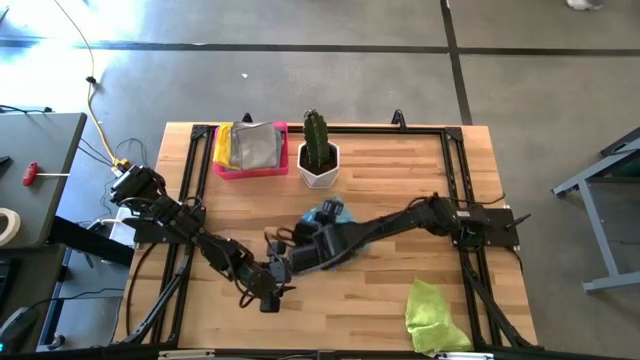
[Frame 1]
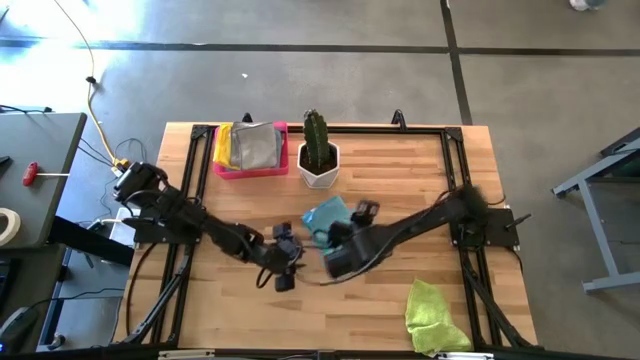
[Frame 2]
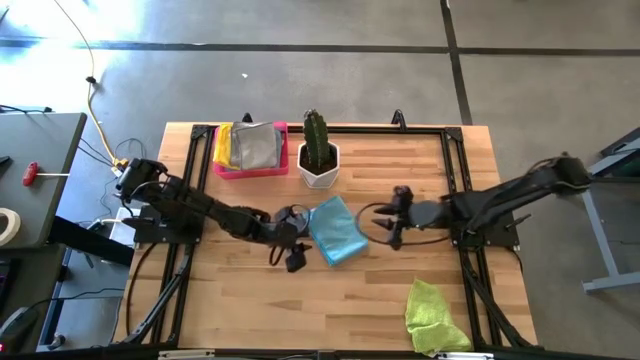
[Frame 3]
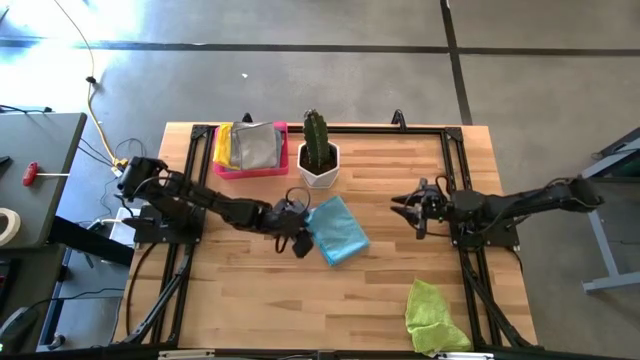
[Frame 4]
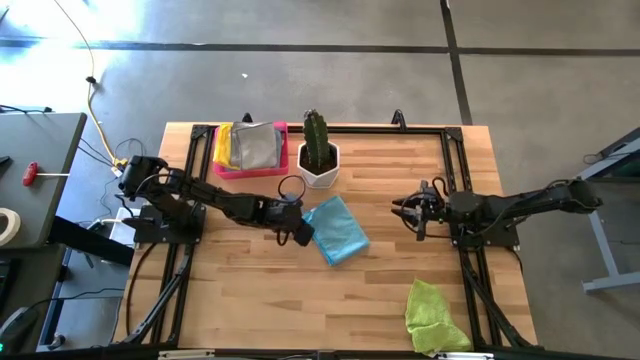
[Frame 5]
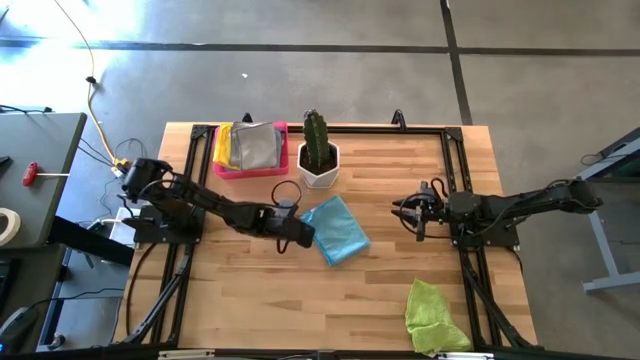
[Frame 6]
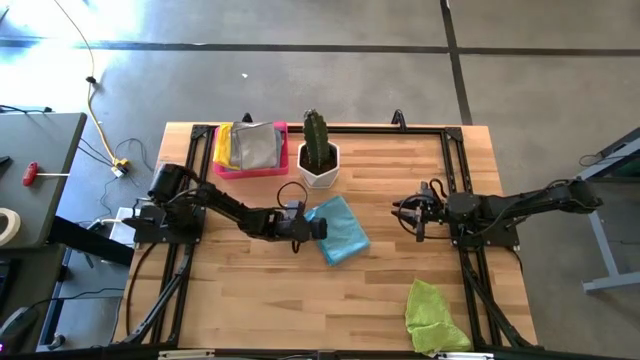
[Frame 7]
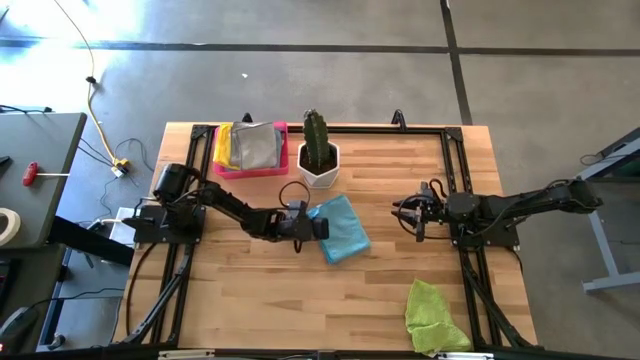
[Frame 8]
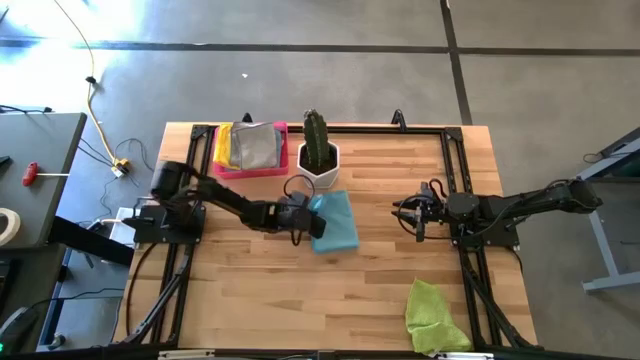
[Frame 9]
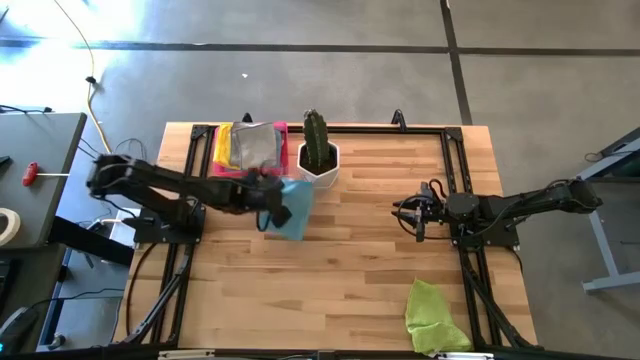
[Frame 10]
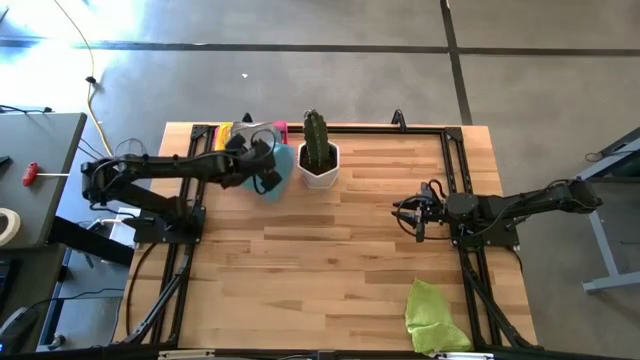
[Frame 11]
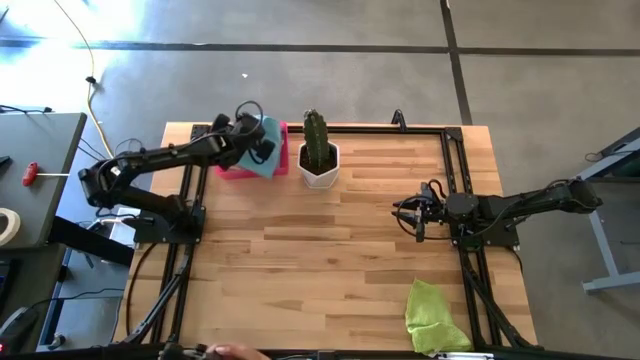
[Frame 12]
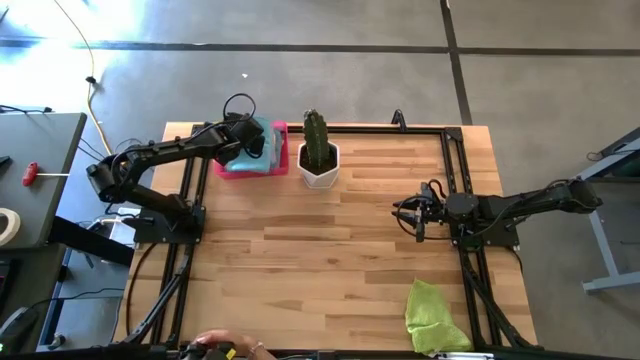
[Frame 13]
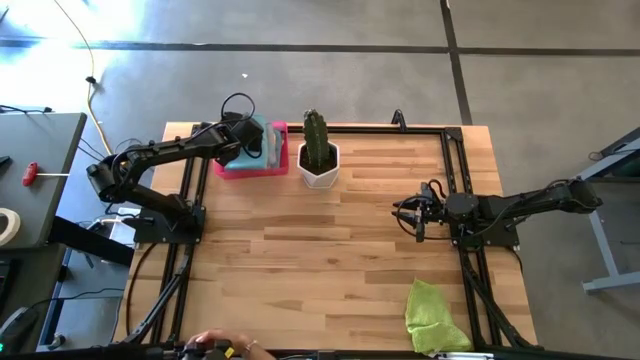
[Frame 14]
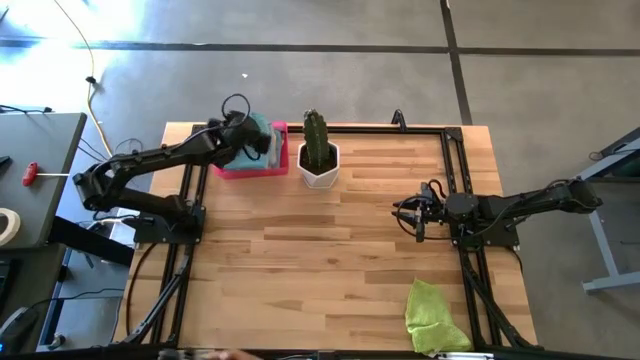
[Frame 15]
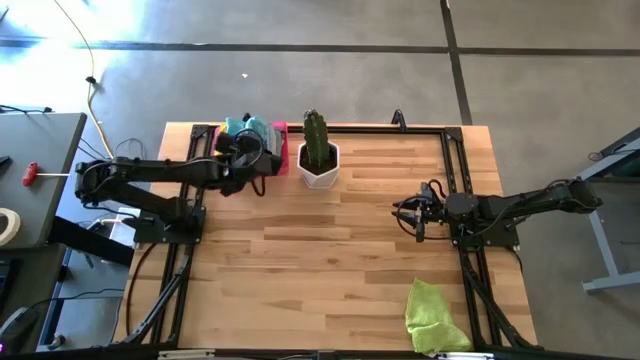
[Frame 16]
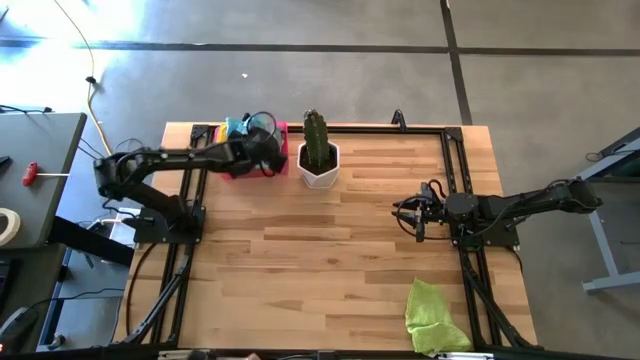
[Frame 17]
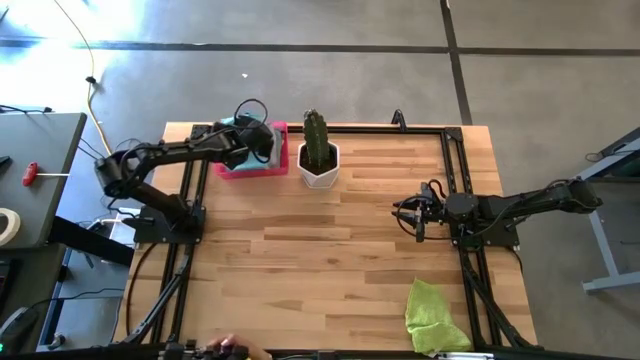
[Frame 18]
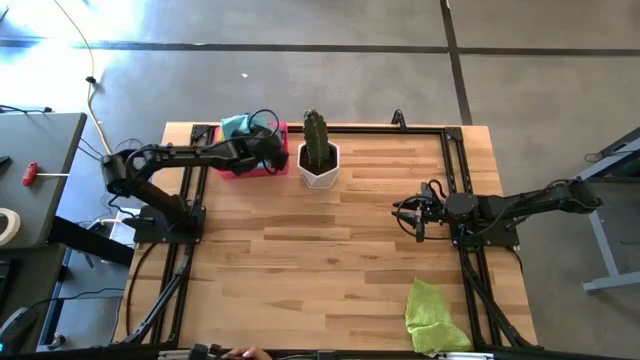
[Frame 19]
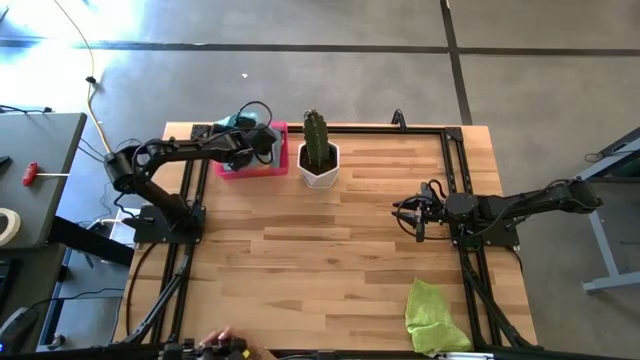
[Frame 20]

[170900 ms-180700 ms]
Task: Fold microfiber towels
Put the folded blue microfiber towel on the pink bin

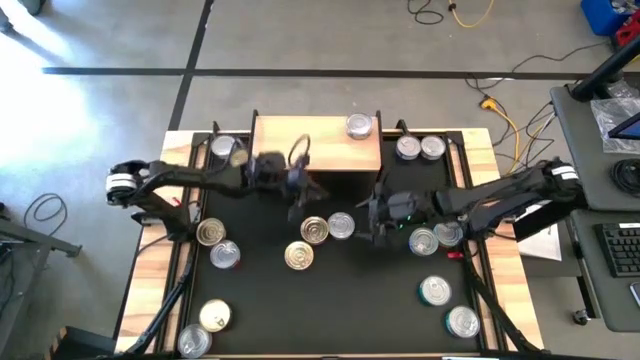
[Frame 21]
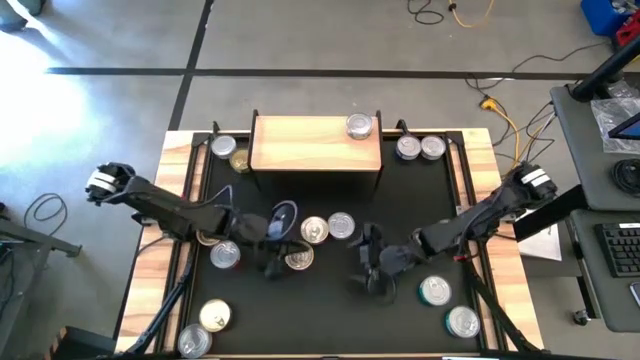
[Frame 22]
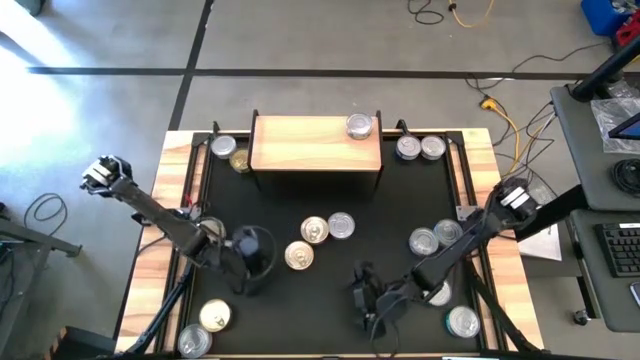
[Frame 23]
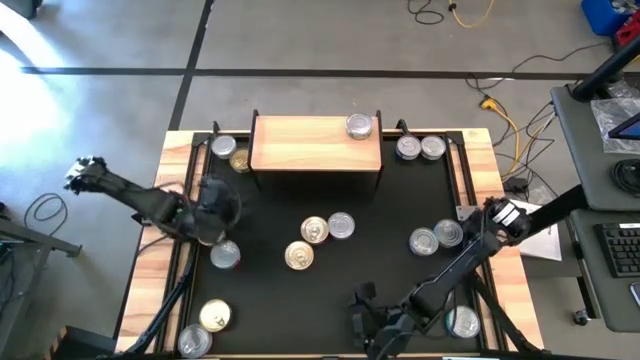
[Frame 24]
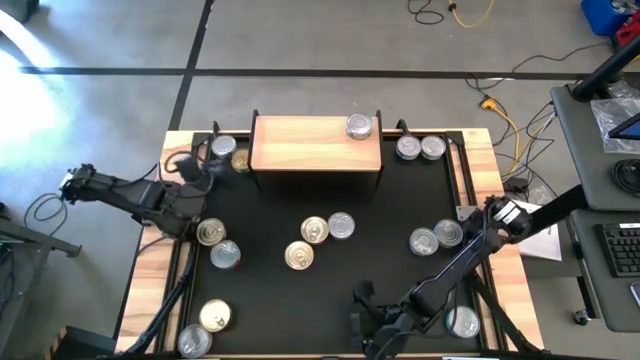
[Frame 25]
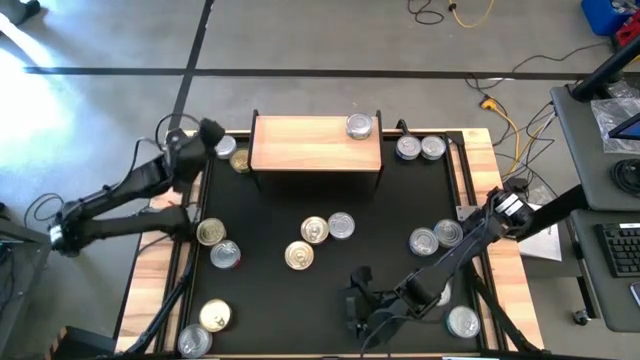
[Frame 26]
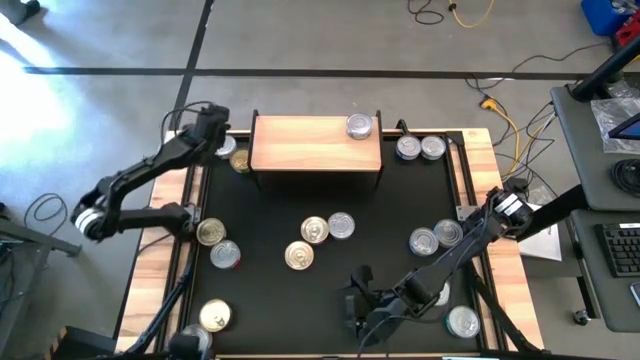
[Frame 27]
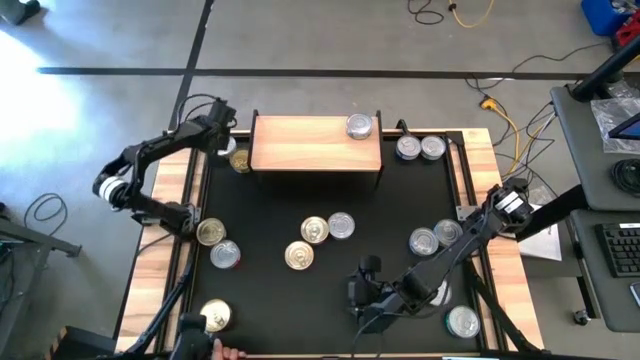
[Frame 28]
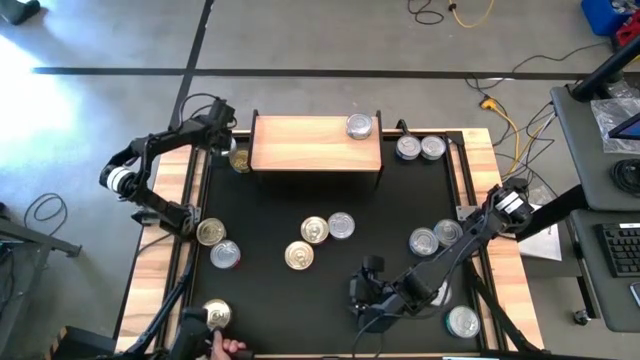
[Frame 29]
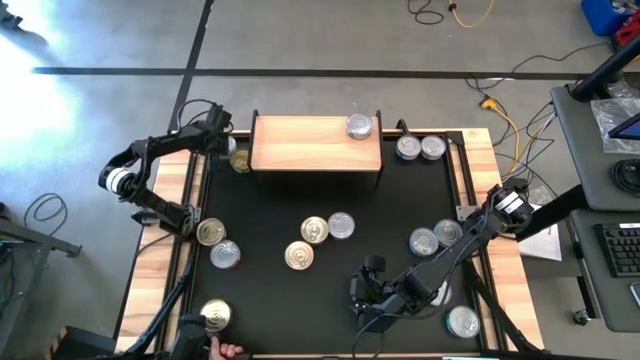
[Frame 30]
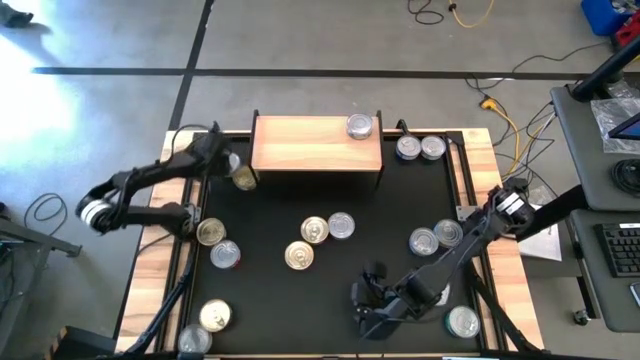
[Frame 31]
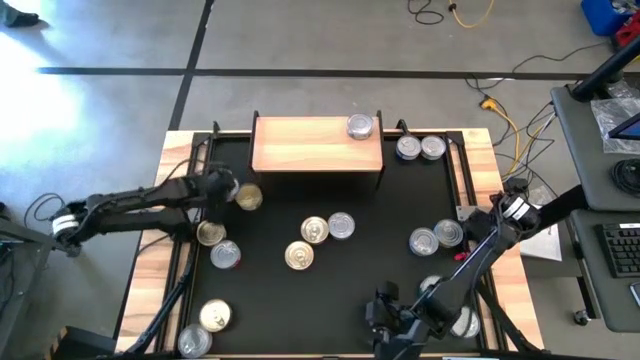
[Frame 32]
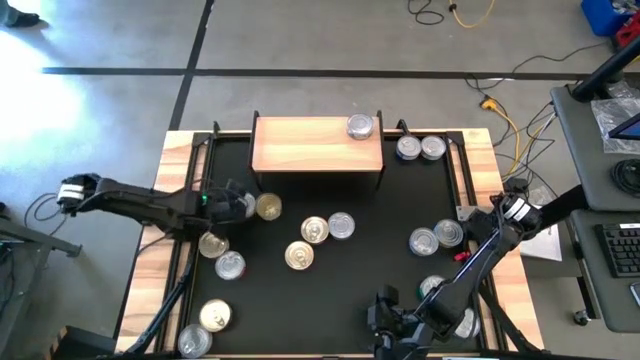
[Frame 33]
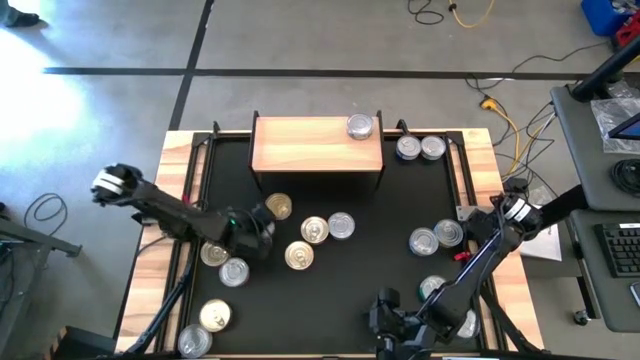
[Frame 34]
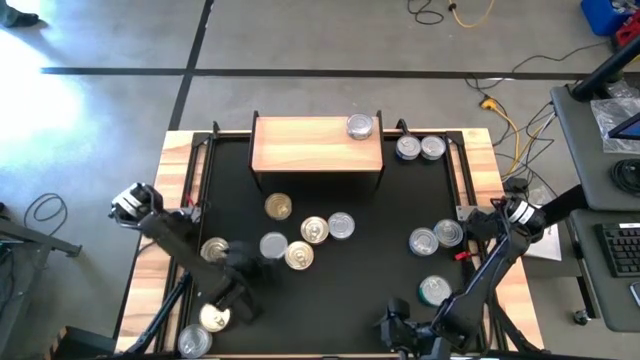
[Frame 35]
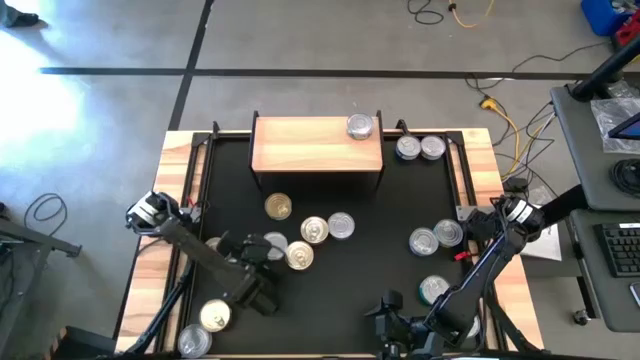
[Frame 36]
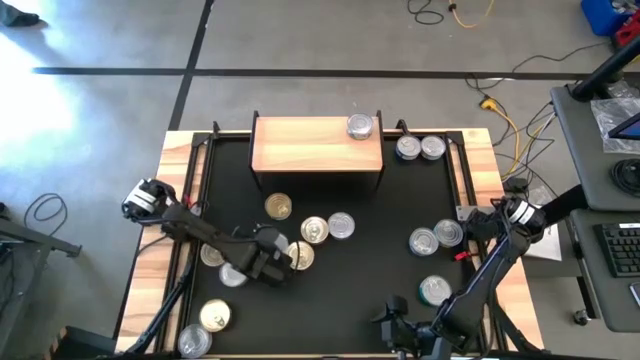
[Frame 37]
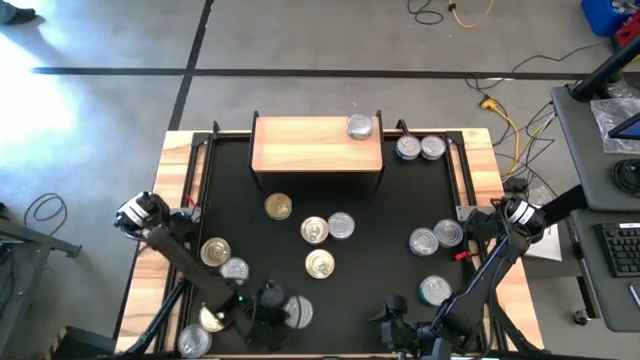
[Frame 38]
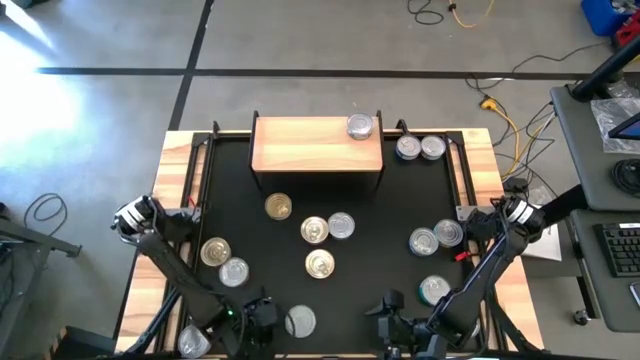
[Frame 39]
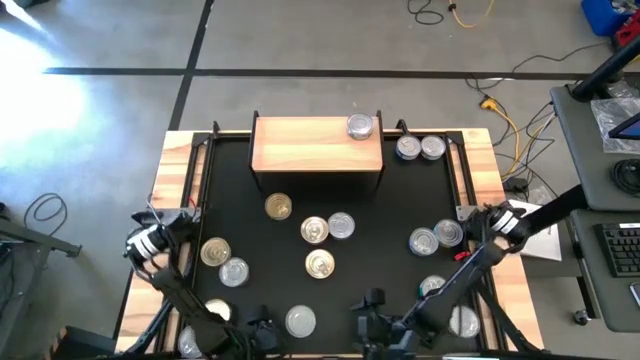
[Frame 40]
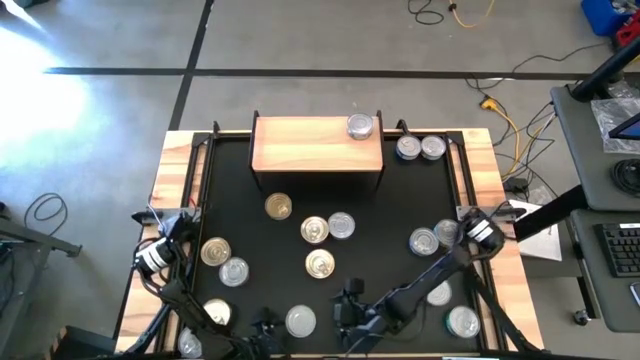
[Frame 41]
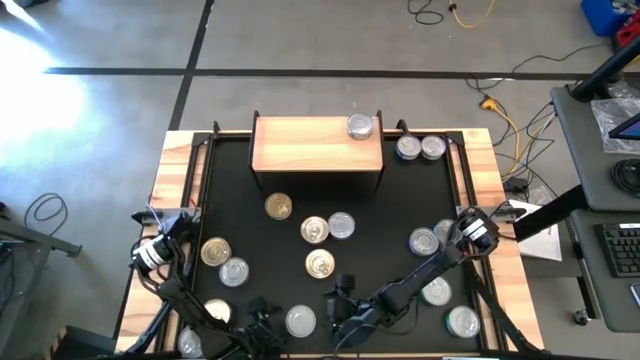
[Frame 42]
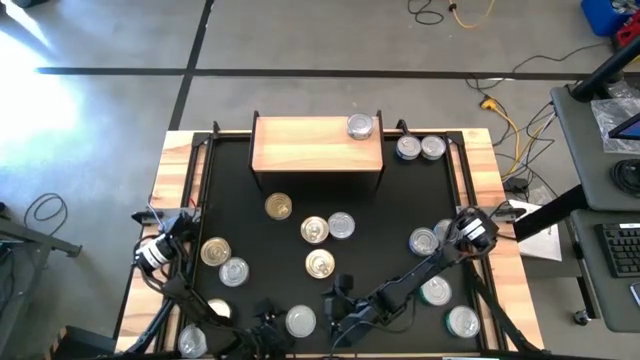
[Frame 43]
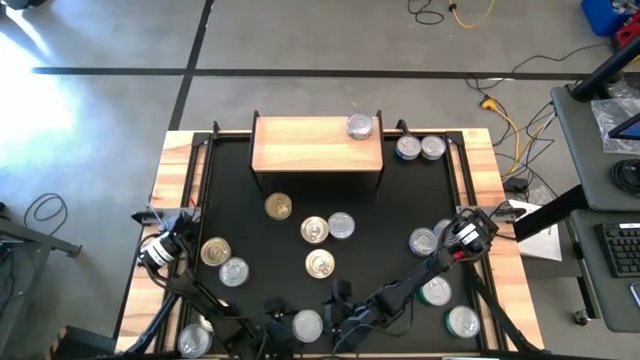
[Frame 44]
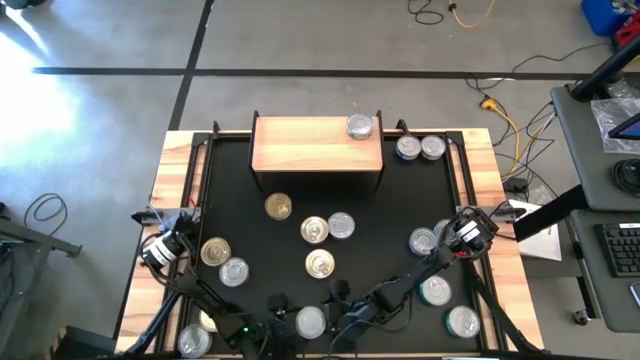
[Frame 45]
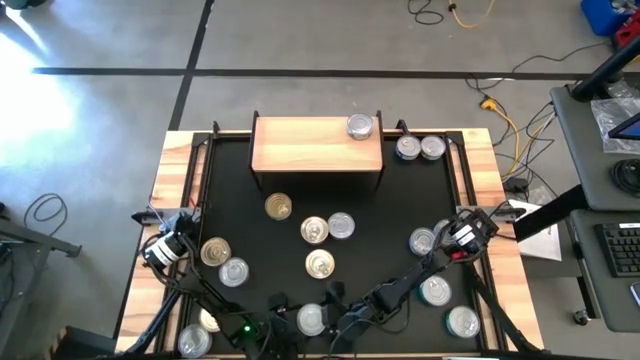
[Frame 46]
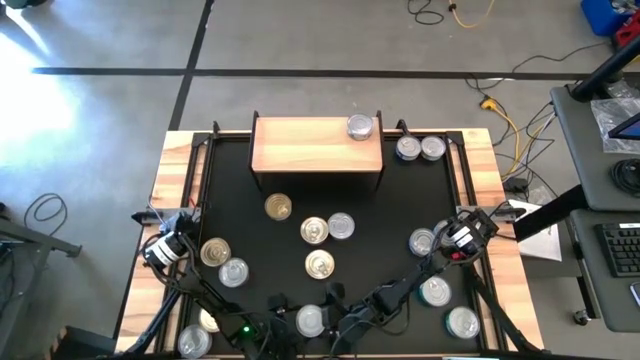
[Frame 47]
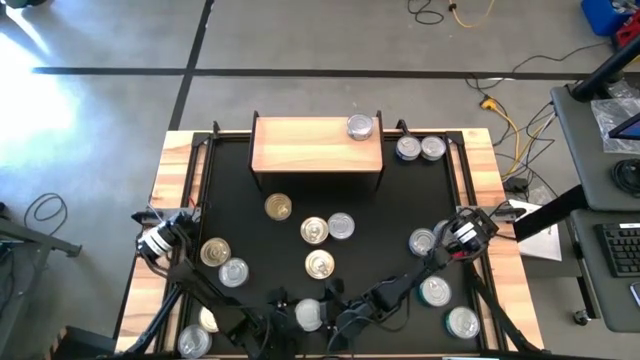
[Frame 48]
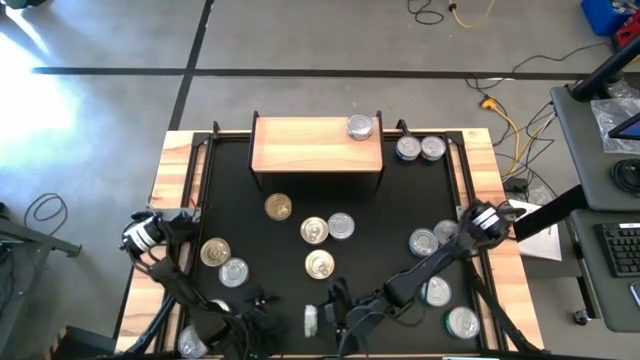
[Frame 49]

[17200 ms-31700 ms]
Task: Stack canned seafood by type on shelf
Stack the light green tuna can on top of the light green tuna can on the shelf
